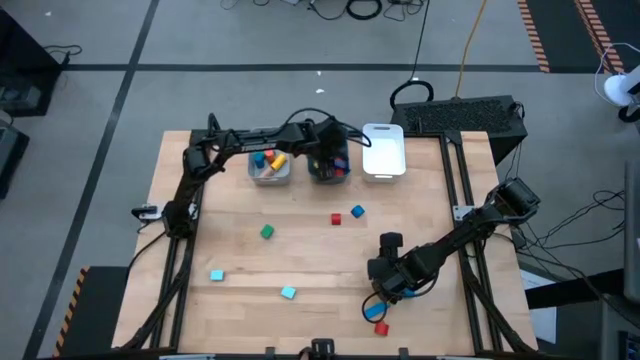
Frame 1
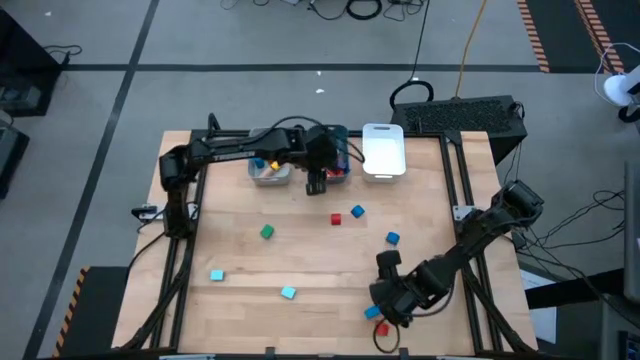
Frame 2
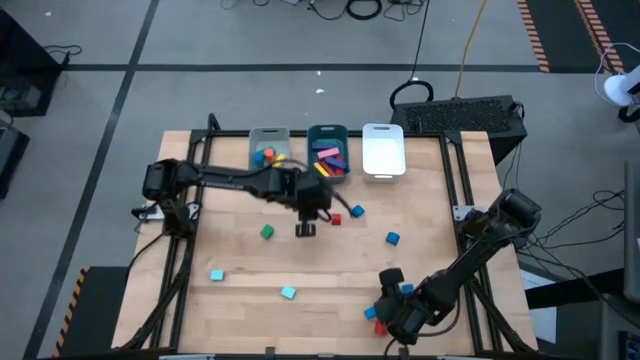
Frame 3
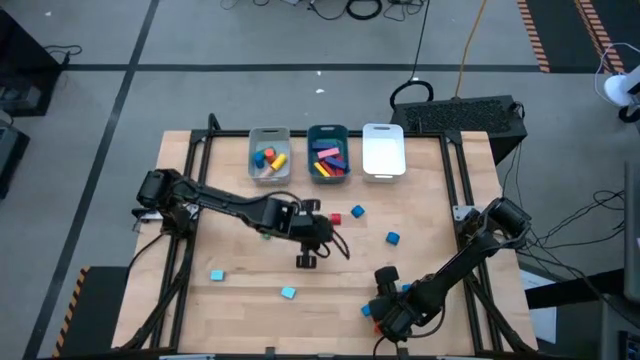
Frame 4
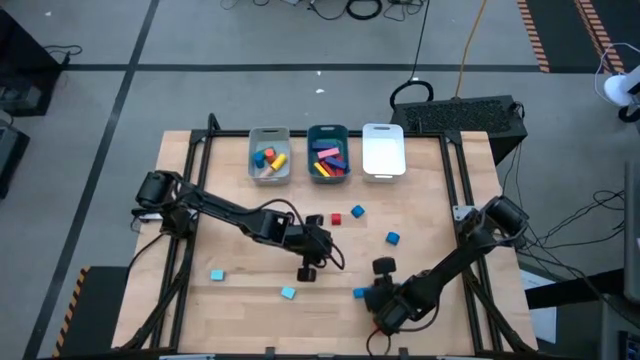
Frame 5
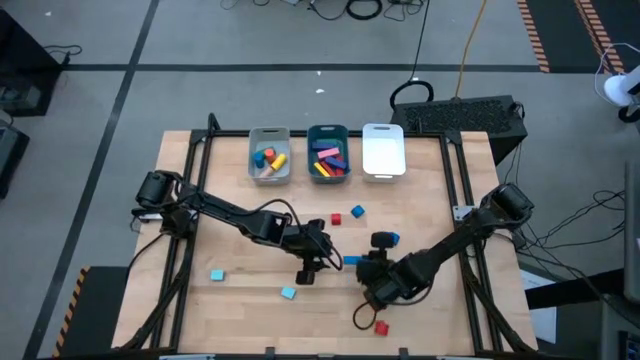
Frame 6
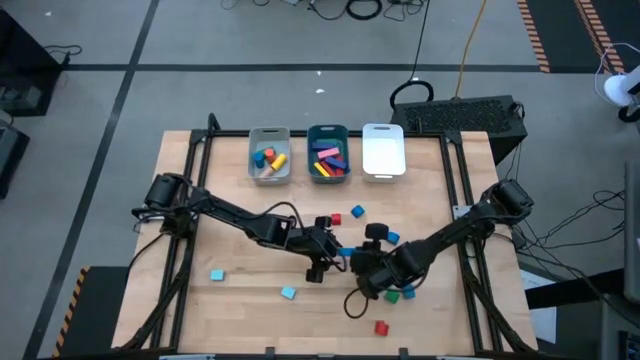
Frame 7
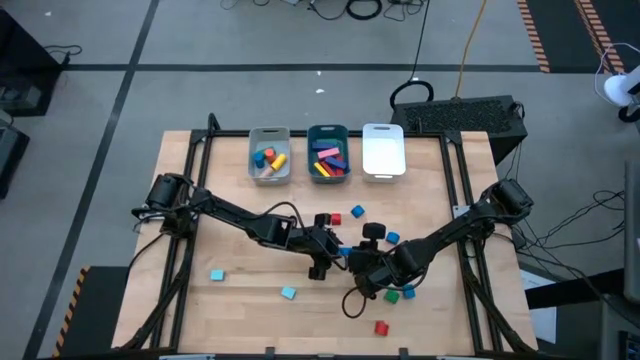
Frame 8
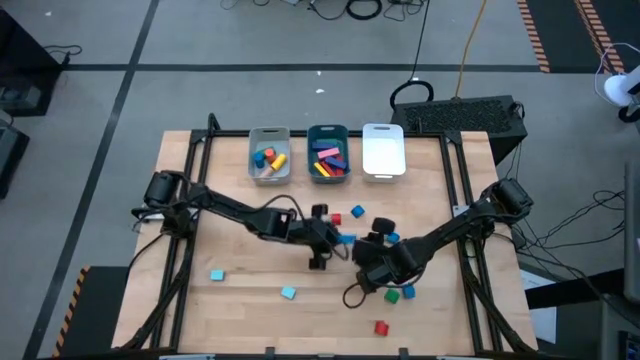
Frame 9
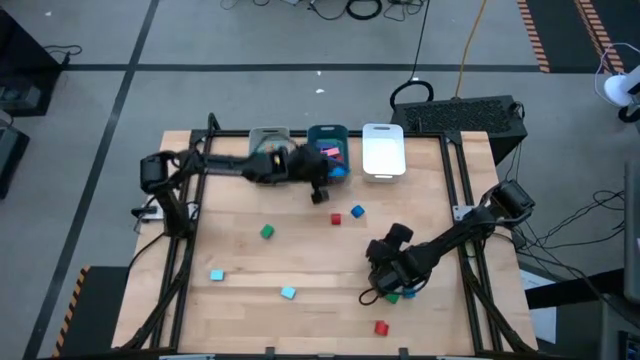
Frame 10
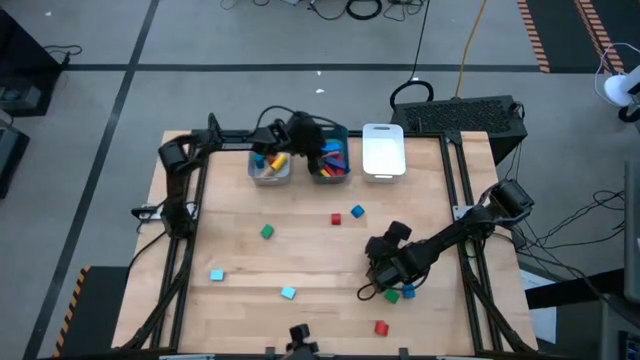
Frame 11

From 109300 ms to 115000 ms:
Task: Sort blocks by size
Put the blue rectangle block into the blue bin

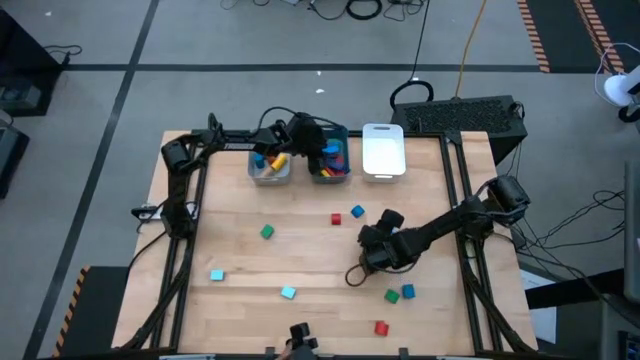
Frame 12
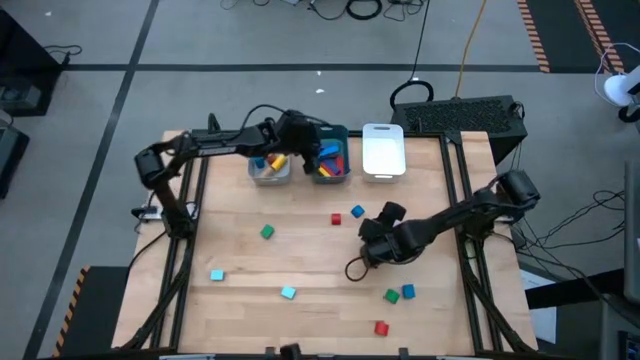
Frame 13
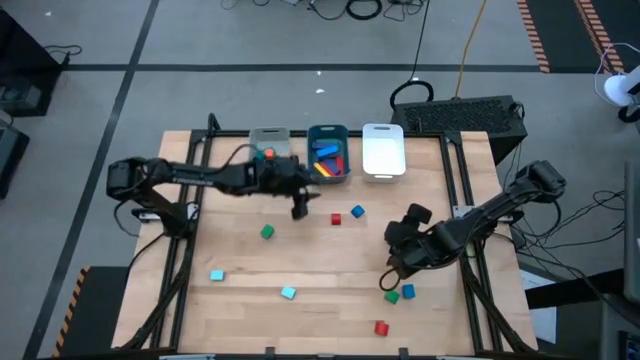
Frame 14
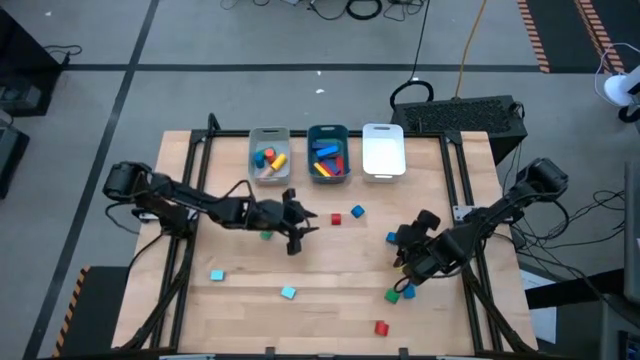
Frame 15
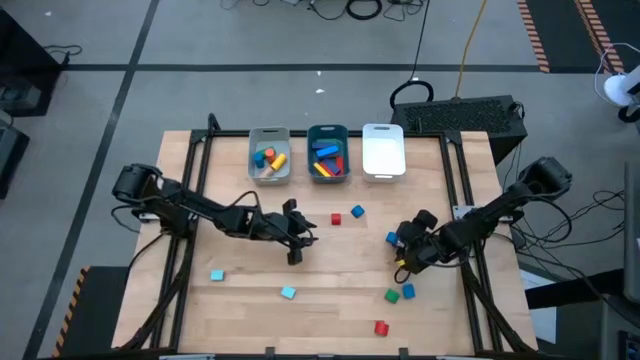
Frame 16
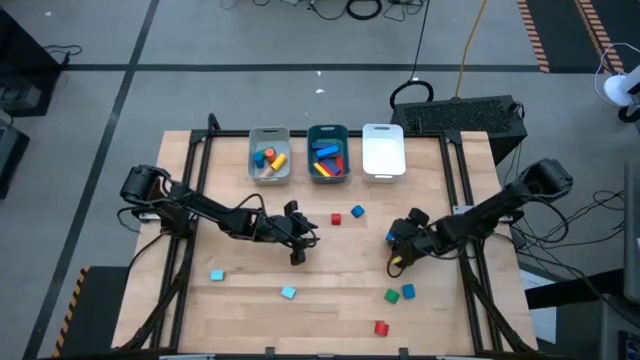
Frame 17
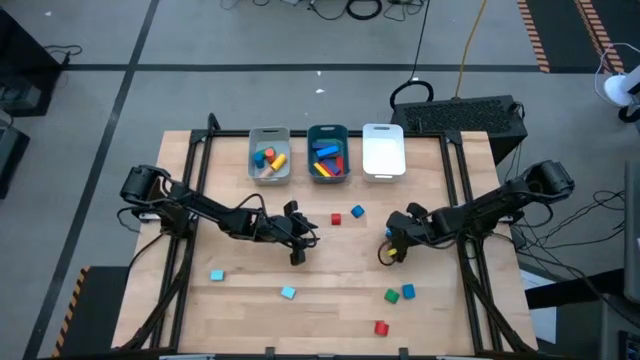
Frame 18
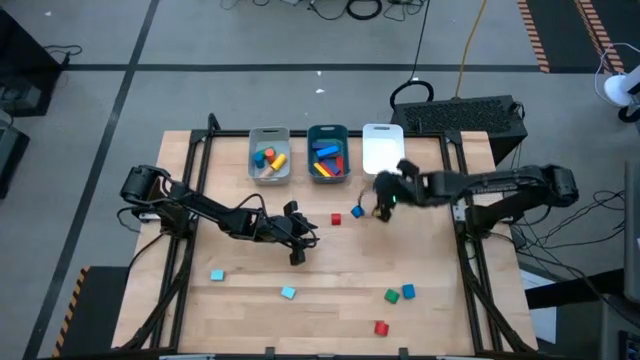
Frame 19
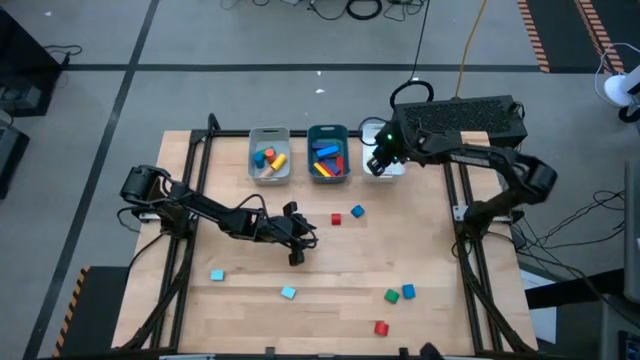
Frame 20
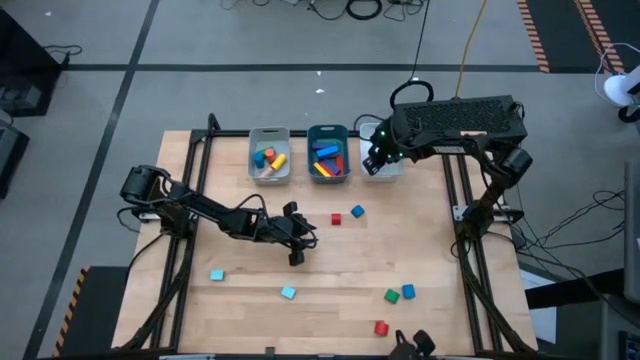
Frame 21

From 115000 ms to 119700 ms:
Put the middle blue half-circle block into the white bin

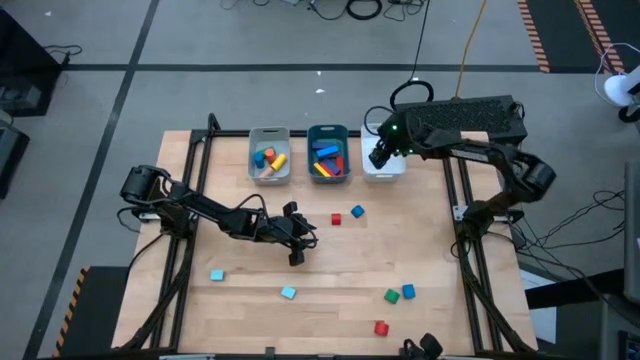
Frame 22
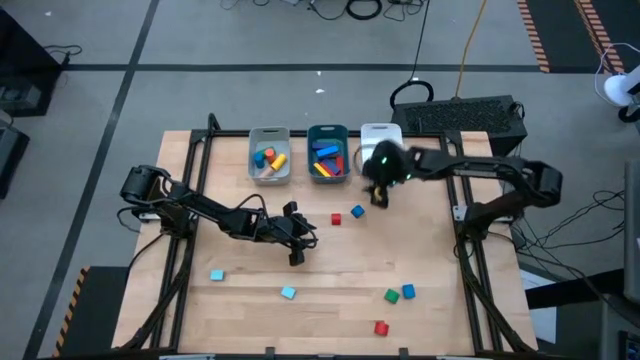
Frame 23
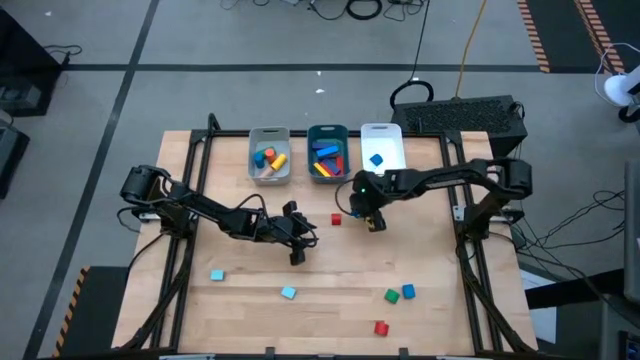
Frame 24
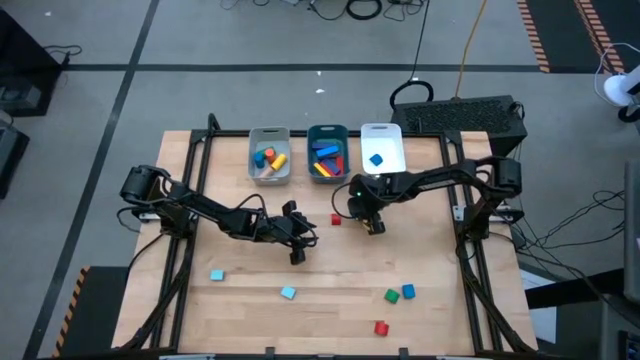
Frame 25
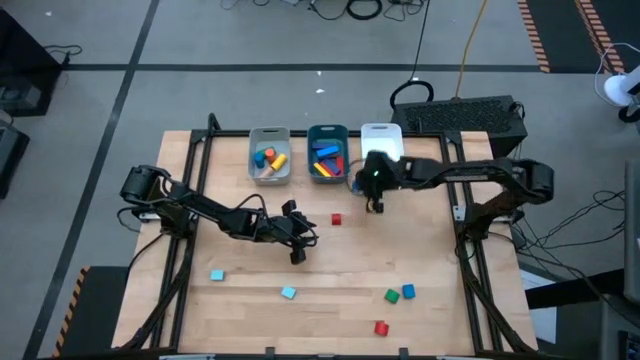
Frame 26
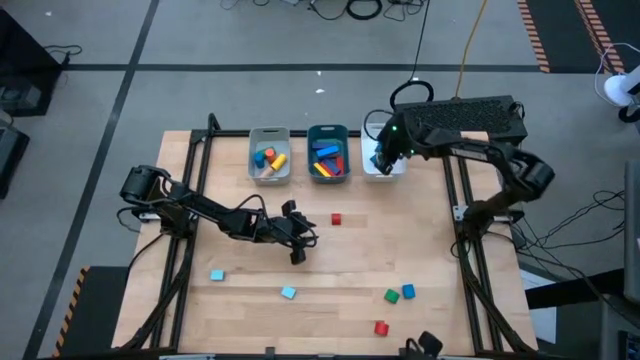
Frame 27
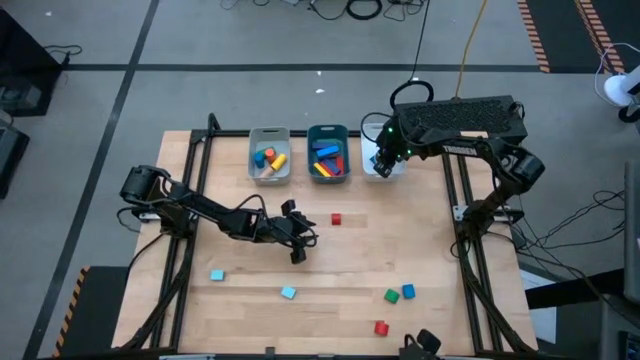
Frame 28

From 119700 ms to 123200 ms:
Put the top blue half-circle block into the white bin

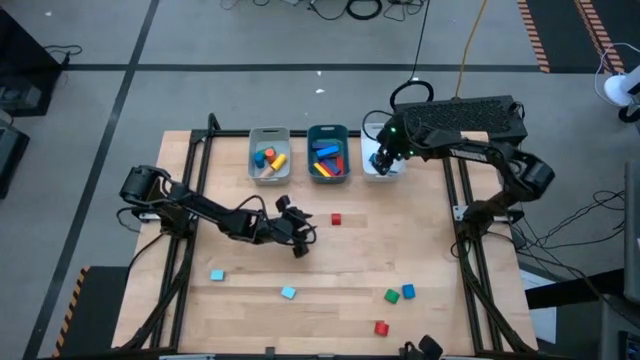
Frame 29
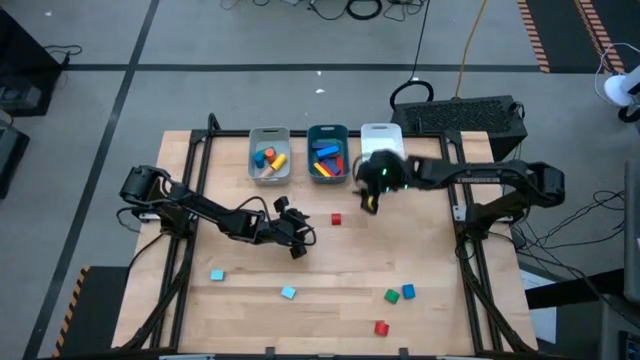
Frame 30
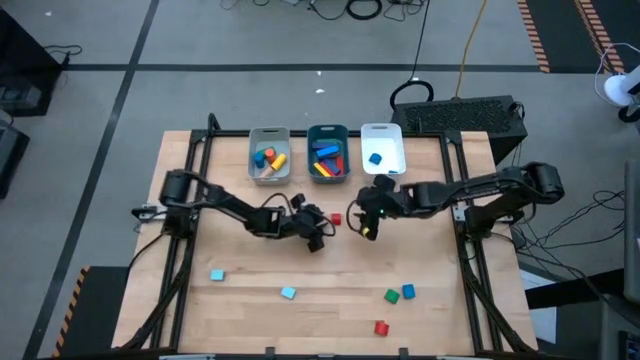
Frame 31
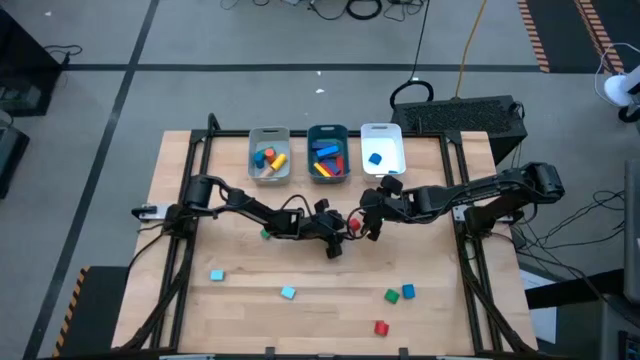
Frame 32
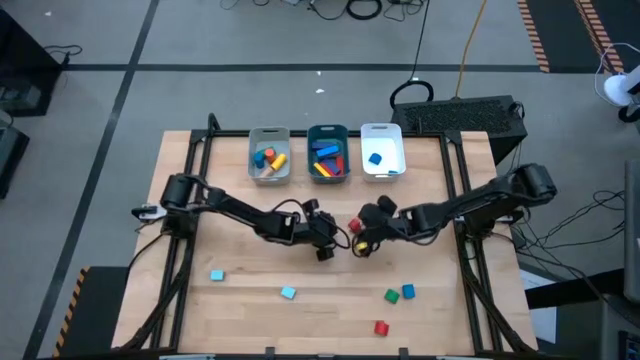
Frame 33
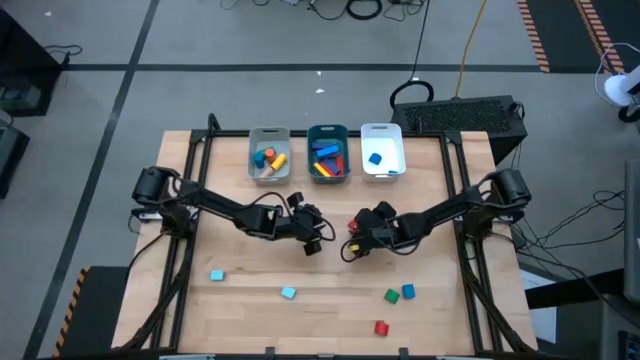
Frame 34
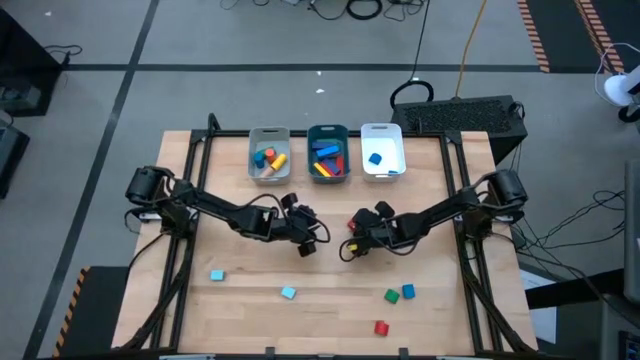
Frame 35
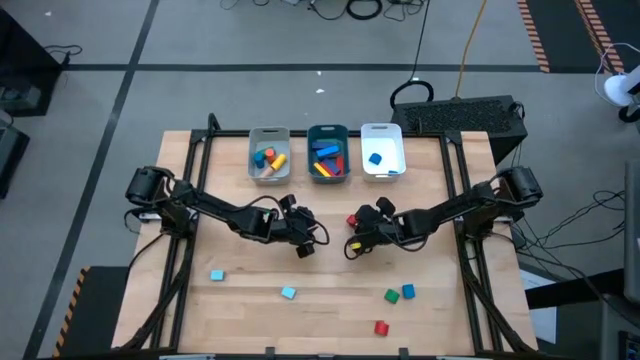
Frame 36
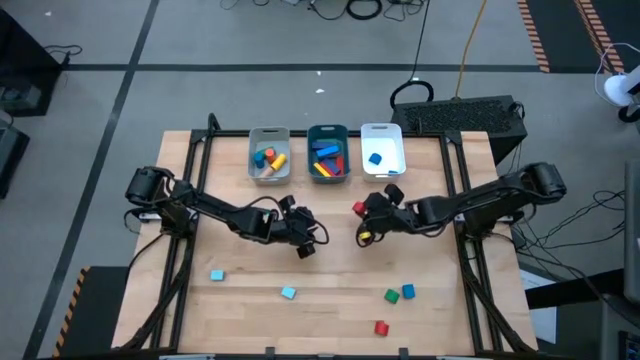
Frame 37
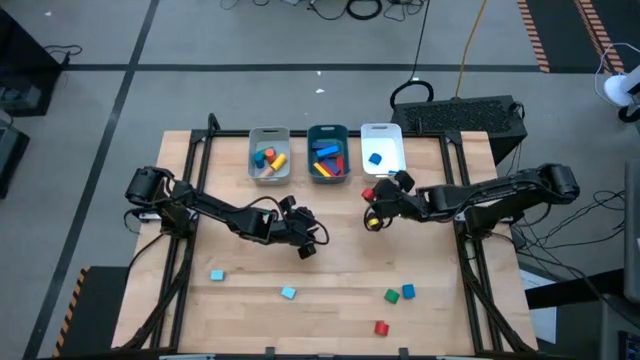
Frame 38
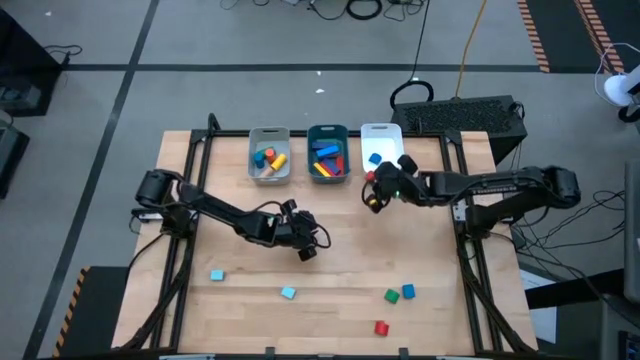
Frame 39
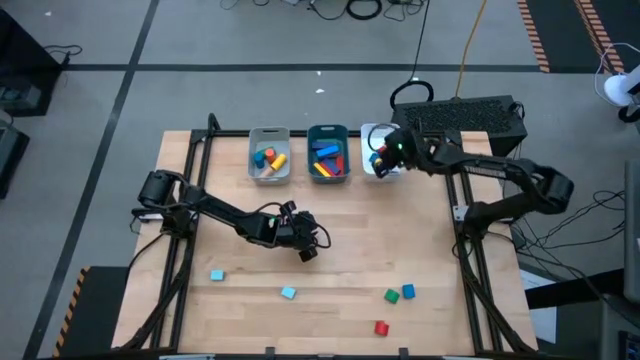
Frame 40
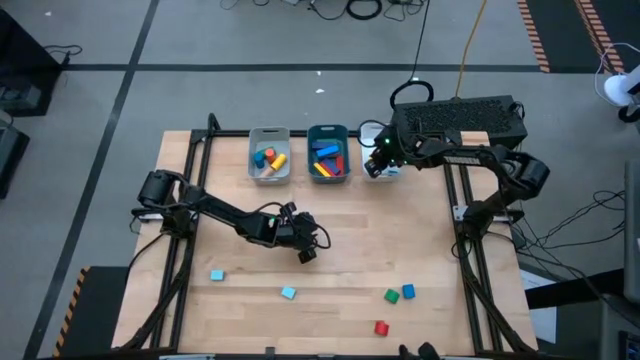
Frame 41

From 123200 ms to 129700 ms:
Put the top red half-circle block into the white bin
